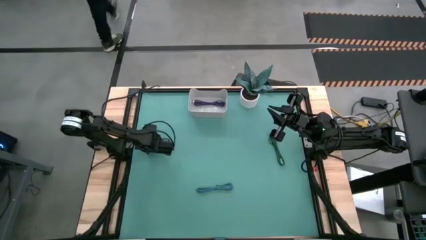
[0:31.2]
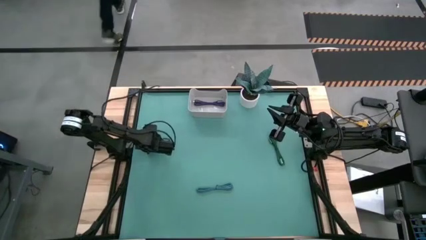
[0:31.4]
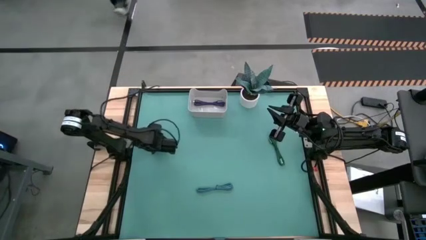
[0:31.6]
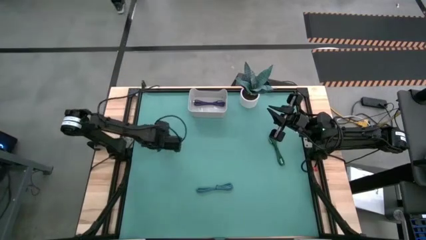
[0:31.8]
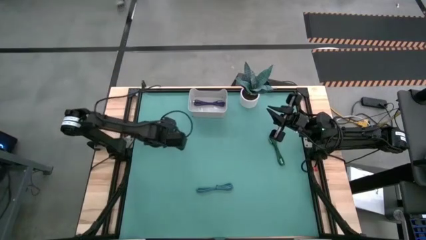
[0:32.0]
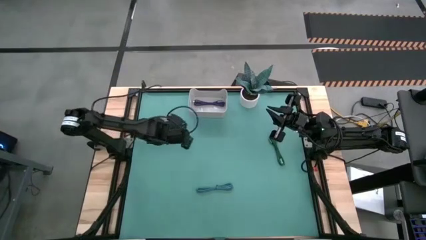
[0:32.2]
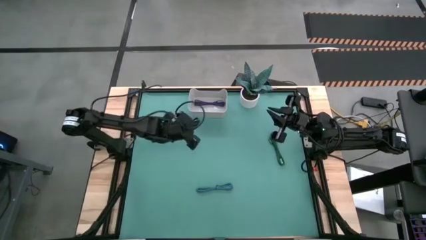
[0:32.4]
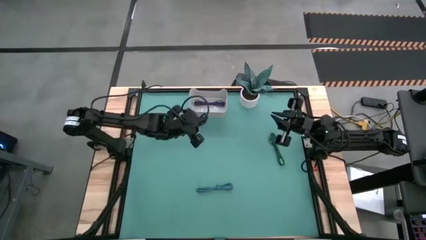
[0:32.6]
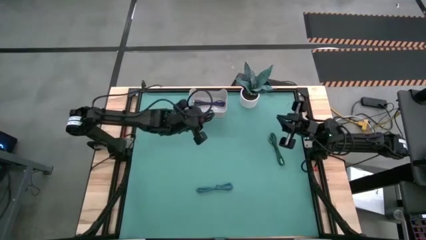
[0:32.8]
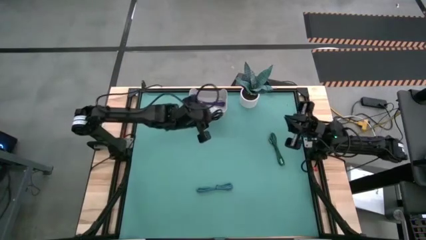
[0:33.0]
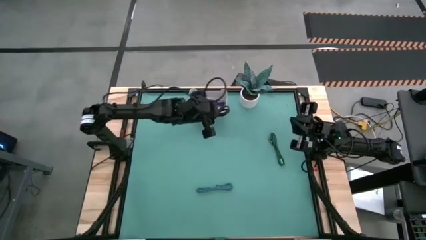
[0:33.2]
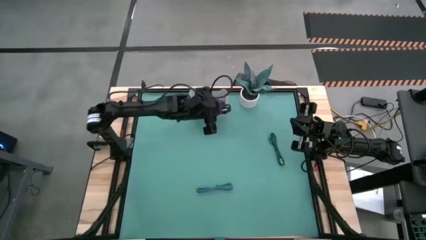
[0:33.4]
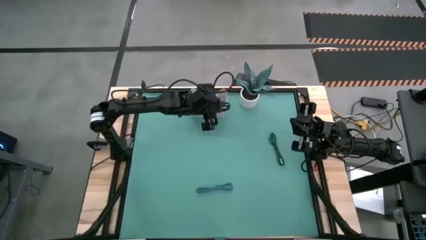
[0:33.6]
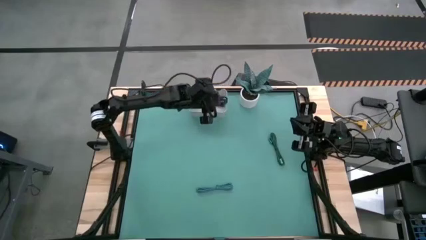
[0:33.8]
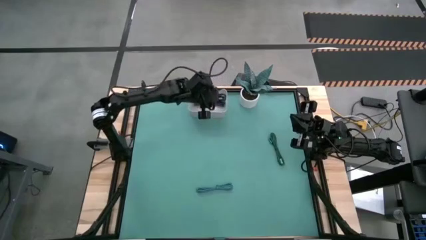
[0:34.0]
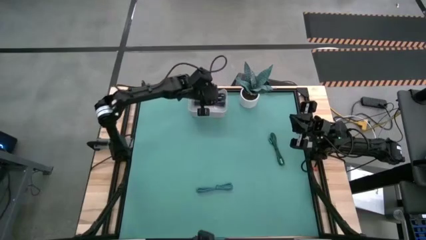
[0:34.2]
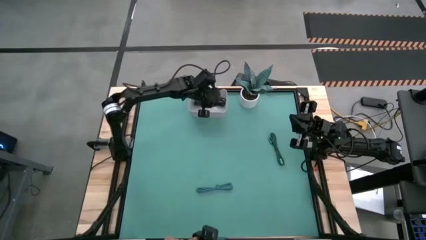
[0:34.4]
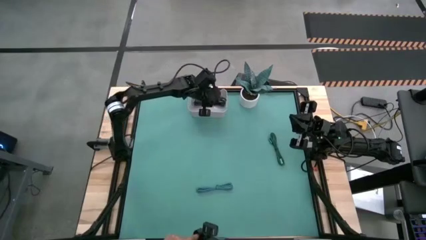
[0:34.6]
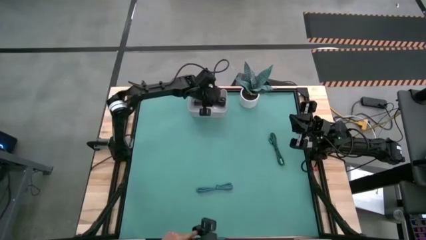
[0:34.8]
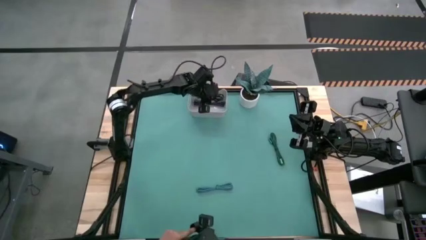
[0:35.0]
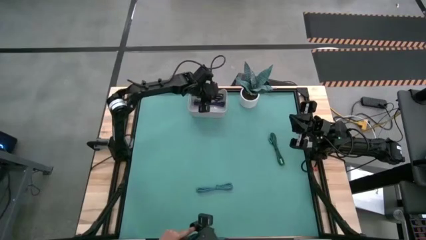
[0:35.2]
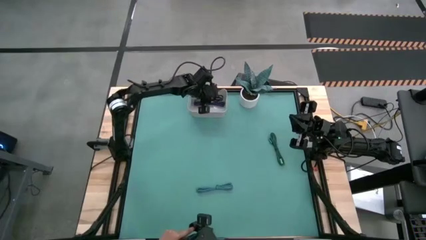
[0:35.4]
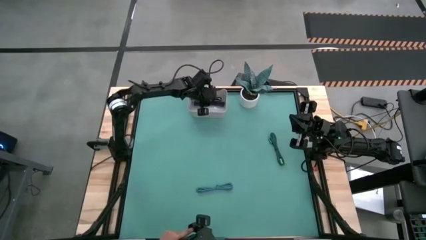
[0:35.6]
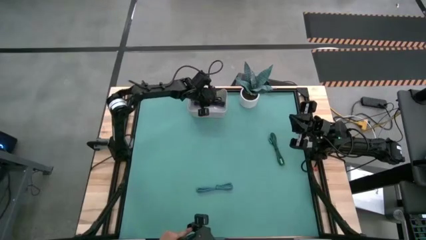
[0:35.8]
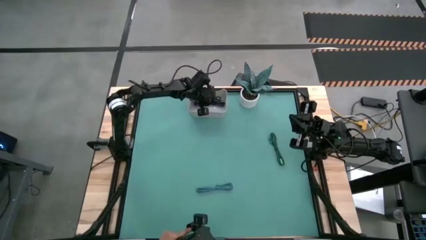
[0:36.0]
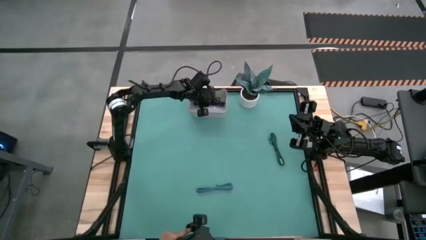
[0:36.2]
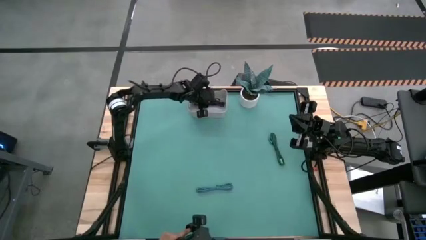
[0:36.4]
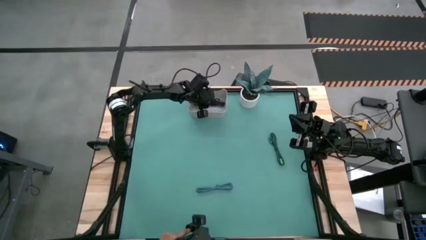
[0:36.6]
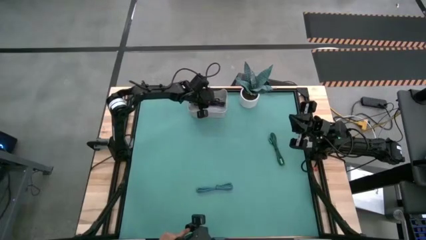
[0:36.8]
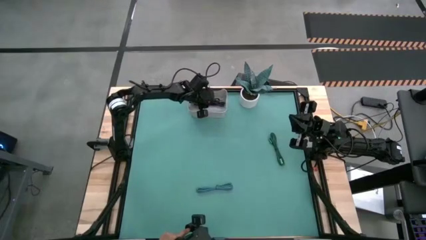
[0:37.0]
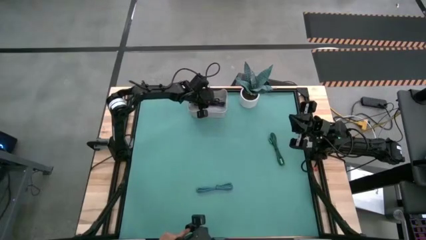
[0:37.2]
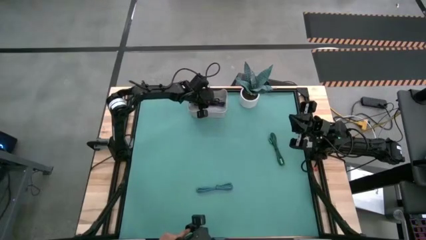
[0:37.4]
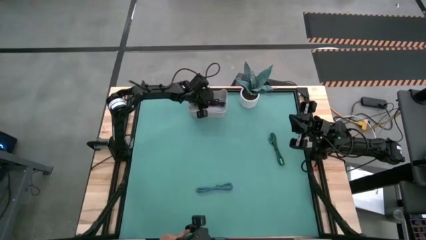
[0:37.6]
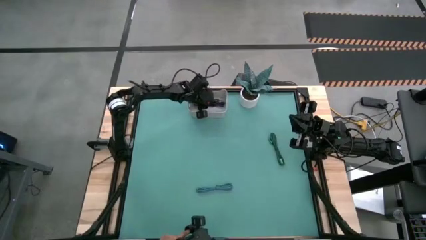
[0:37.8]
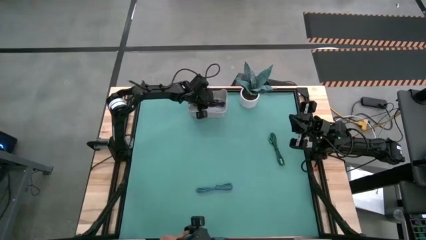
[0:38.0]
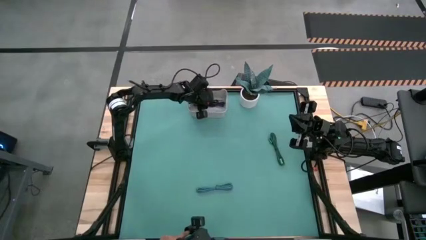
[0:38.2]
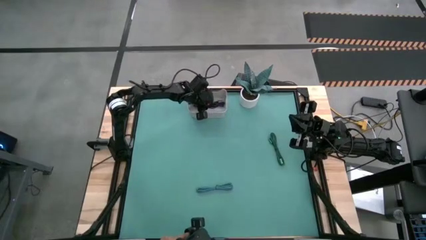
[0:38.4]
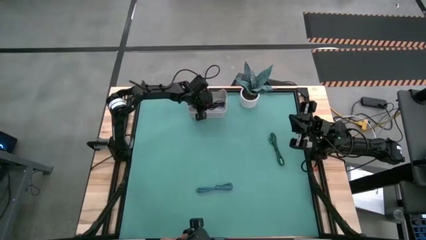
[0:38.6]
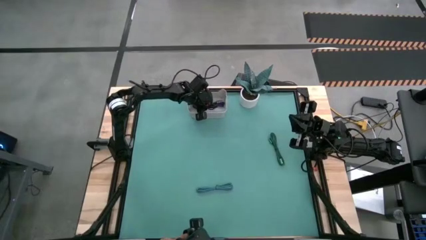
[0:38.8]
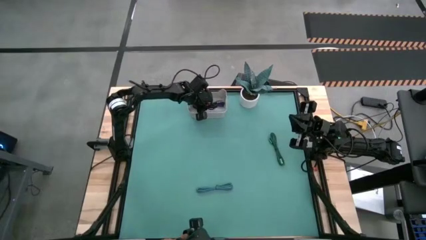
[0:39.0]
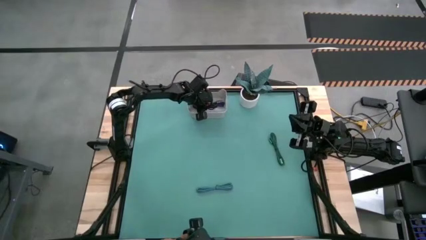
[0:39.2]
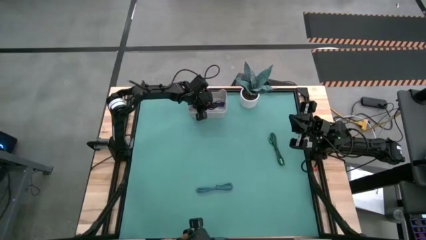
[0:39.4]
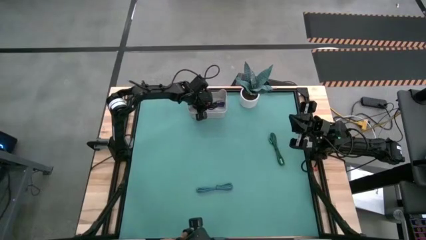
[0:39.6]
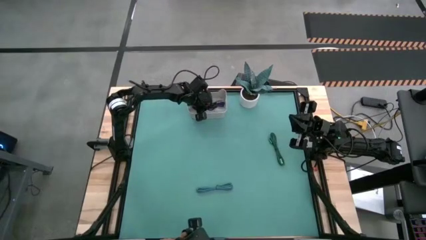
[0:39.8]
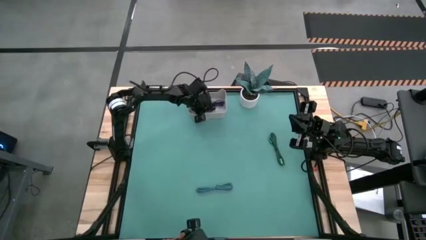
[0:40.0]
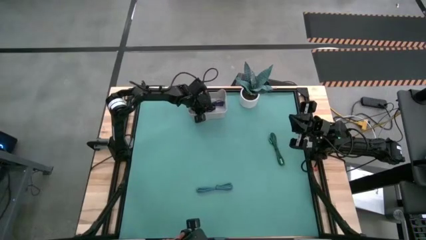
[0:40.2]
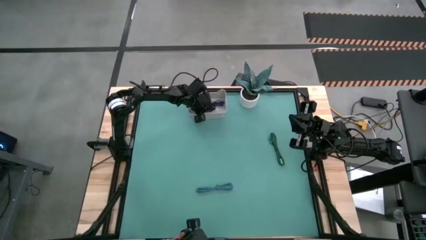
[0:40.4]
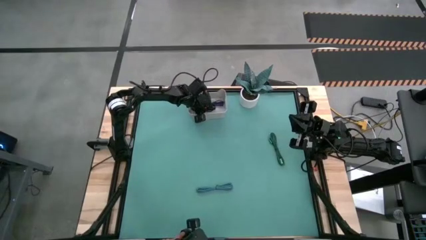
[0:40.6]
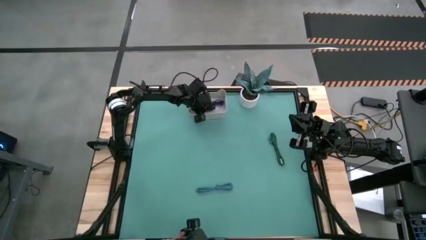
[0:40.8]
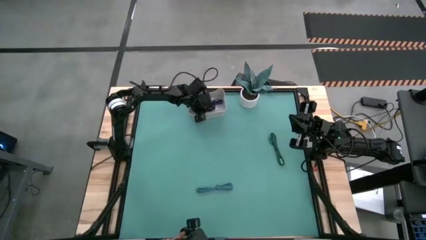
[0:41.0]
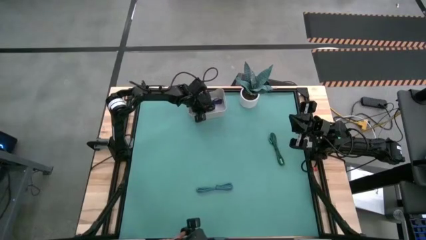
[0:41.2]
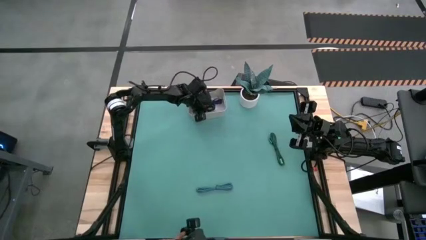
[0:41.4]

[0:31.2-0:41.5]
Task: Pick and place USB-C Cables
Put the black charger cable into the white bin

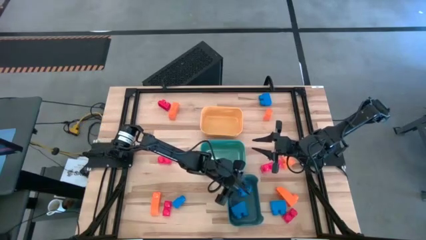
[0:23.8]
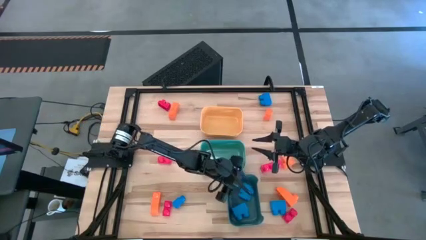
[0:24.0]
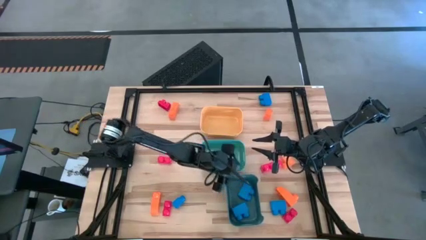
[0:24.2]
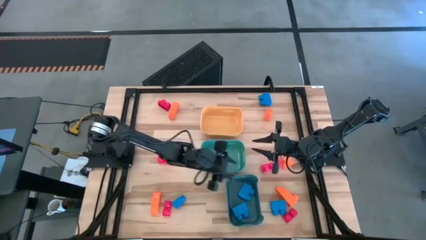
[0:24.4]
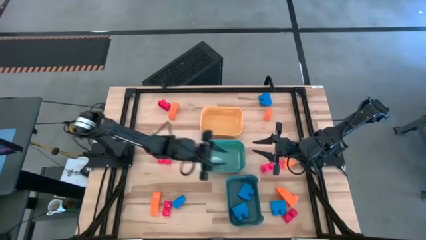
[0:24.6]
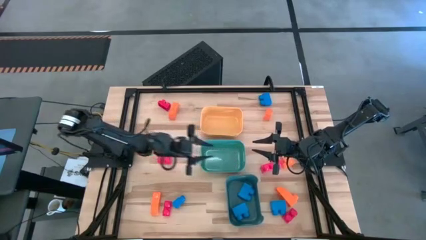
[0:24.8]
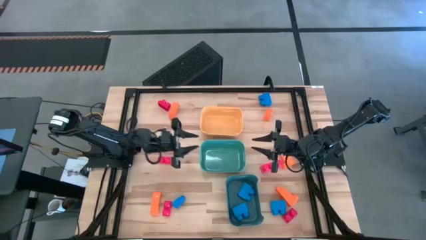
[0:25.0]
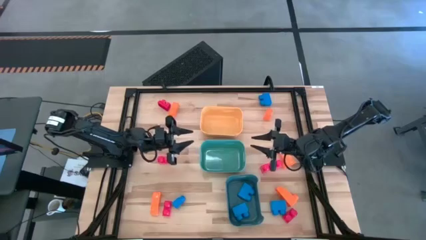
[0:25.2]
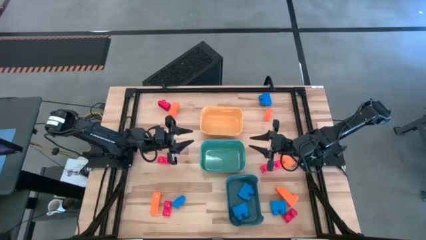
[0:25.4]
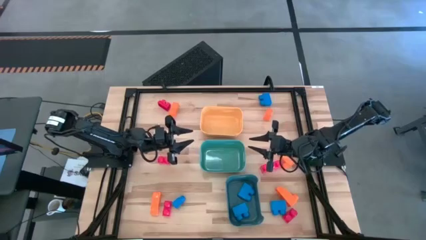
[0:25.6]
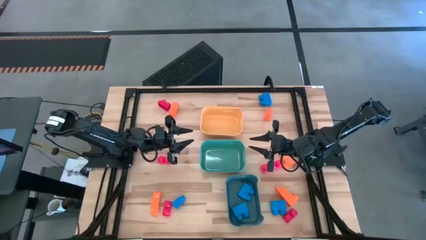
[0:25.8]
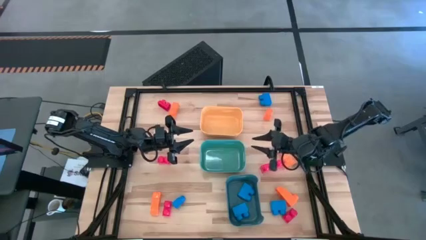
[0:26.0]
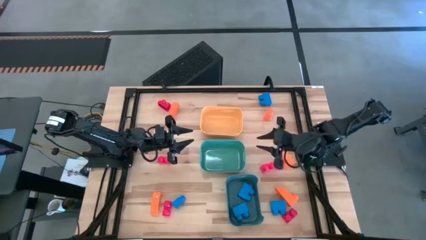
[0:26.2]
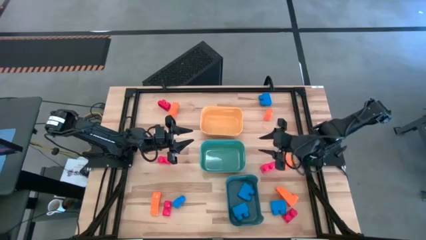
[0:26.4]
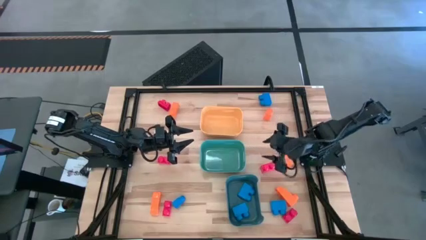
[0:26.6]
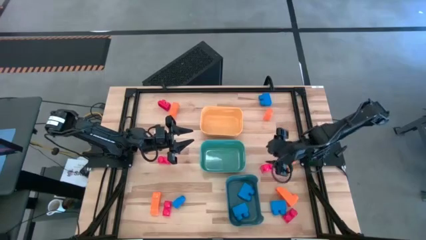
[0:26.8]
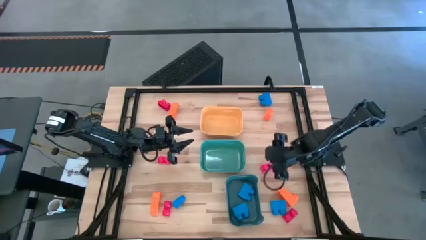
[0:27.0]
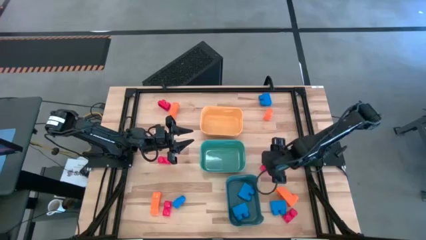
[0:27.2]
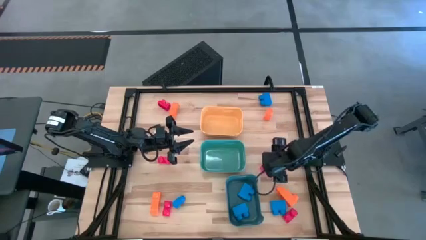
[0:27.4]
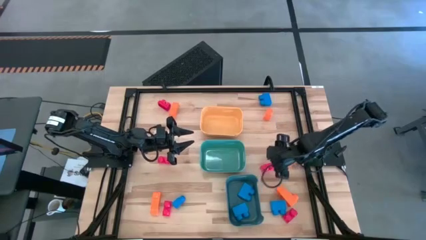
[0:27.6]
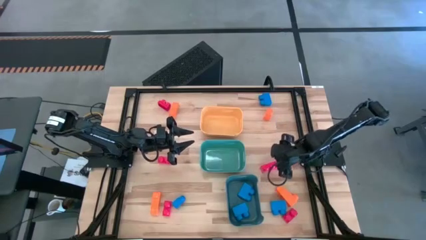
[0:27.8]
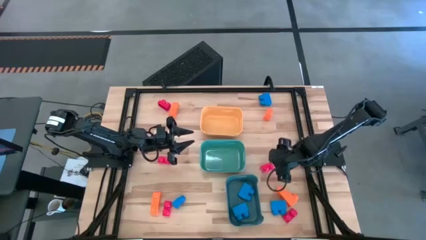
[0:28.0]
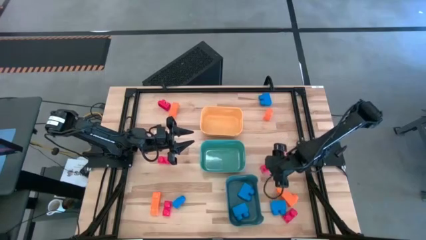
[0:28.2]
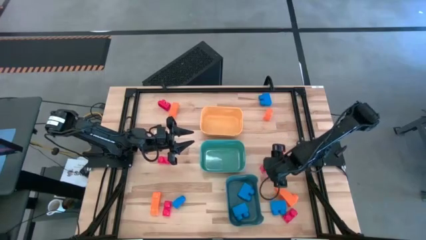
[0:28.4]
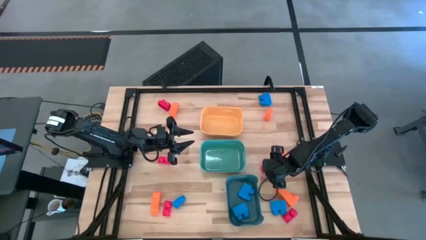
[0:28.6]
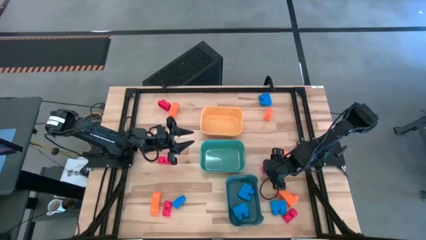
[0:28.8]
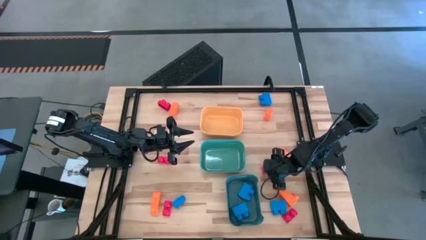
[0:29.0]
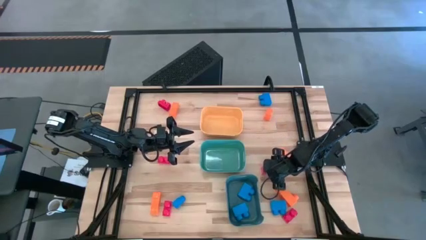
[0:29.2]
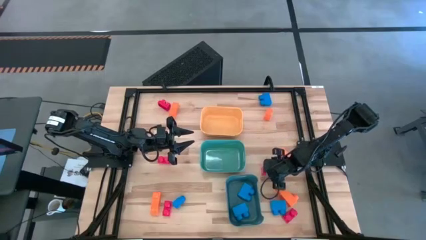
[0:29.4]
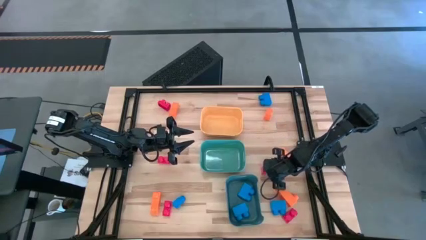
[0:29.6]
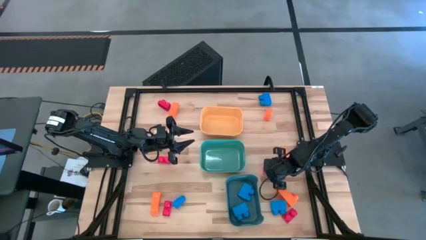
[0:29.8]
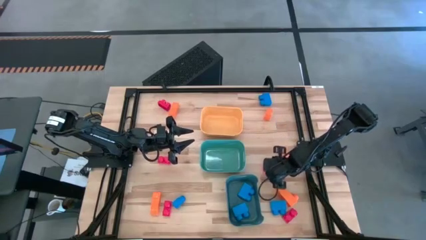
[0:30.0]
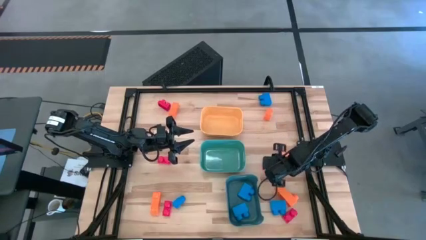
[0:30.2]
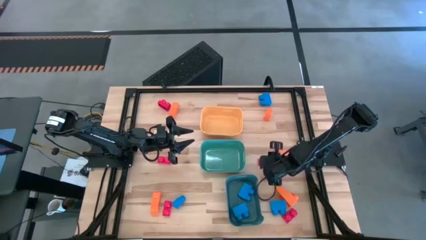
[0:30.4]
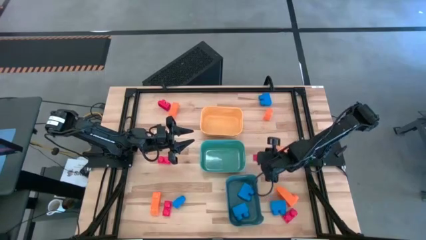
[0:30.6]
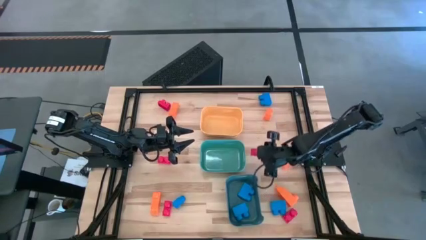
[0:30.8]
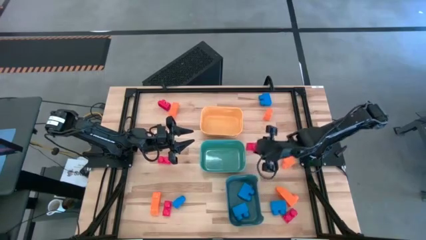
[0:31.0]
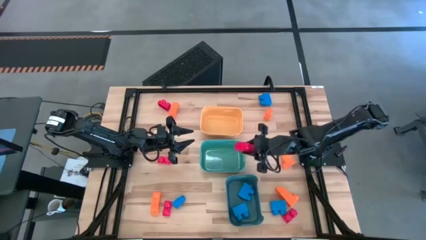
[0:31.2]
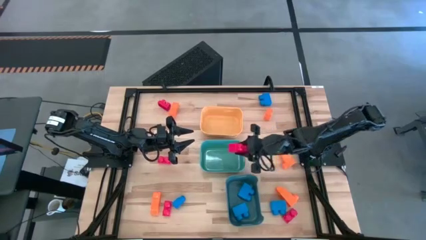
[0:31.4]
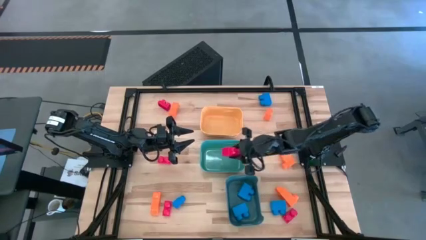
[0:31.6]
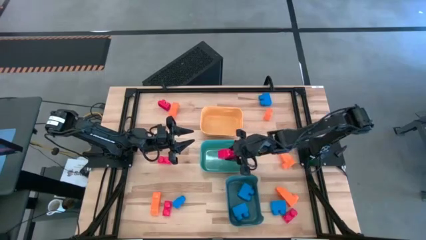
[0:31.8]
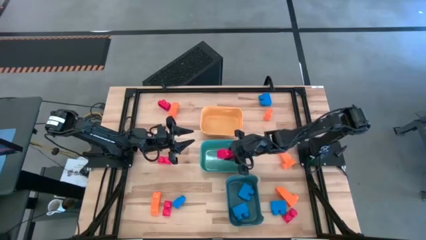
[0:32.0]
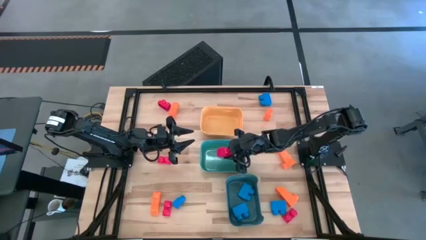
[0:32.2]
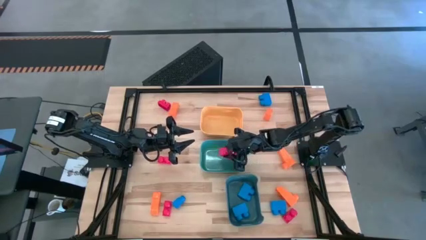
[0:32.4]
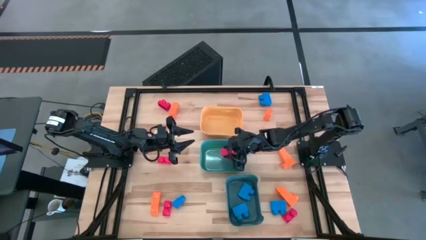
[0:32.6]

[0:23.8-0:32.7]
Task: Sort & place blocks by color
Put the red game piece into the green bin
